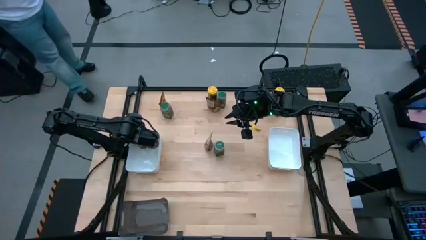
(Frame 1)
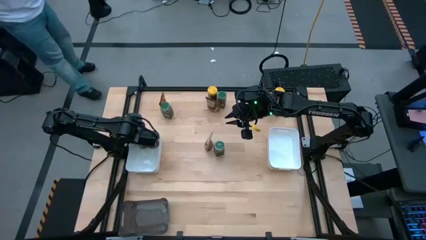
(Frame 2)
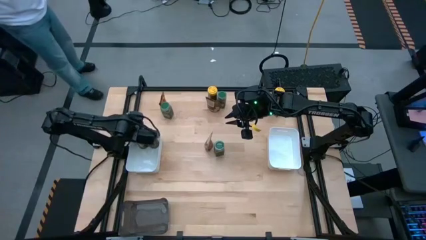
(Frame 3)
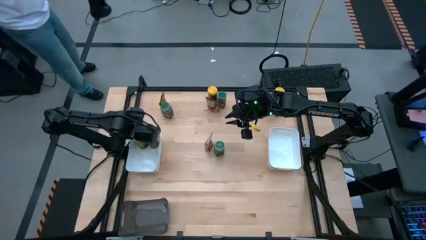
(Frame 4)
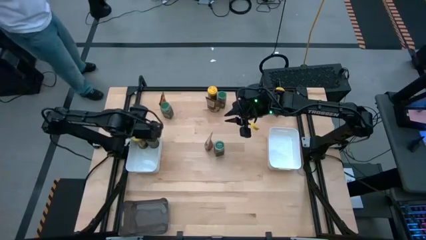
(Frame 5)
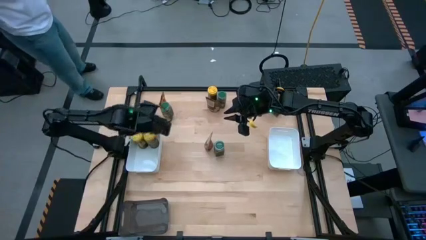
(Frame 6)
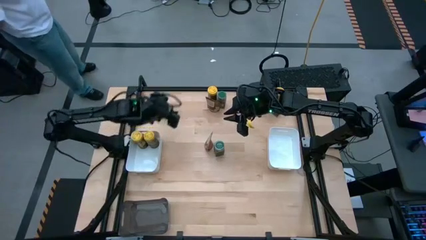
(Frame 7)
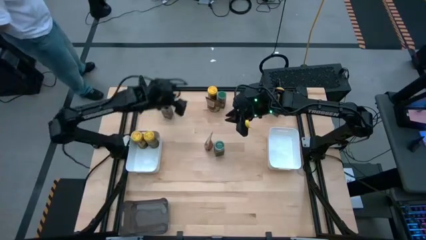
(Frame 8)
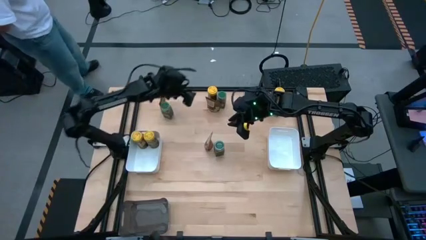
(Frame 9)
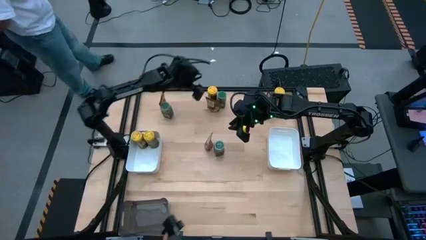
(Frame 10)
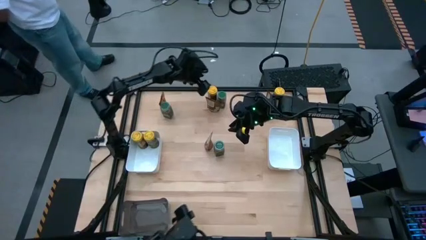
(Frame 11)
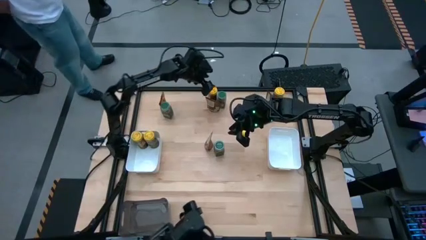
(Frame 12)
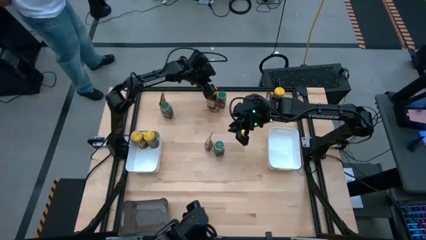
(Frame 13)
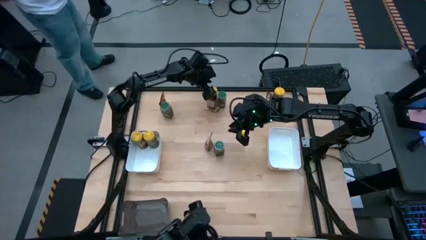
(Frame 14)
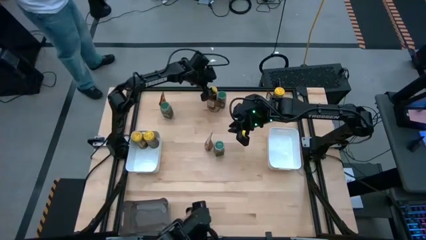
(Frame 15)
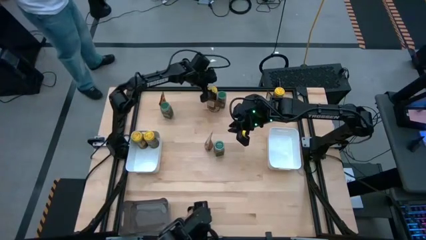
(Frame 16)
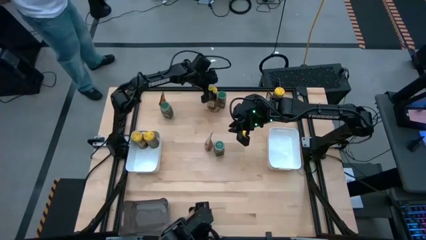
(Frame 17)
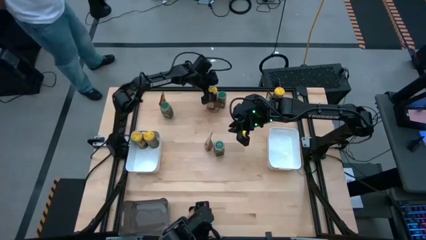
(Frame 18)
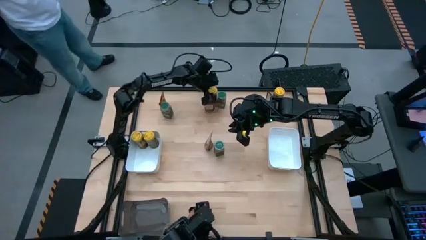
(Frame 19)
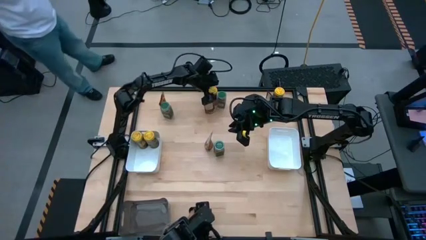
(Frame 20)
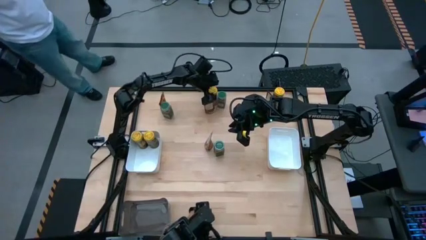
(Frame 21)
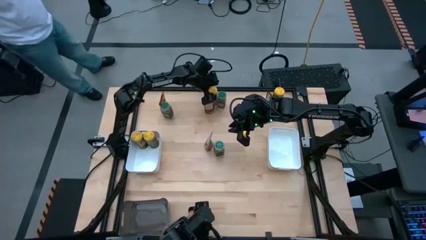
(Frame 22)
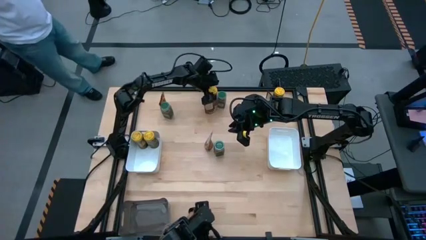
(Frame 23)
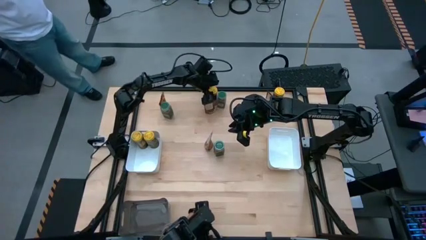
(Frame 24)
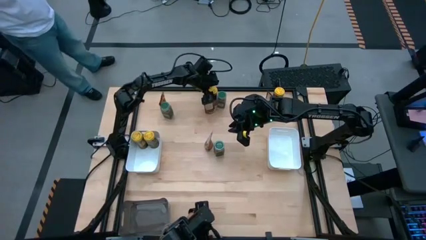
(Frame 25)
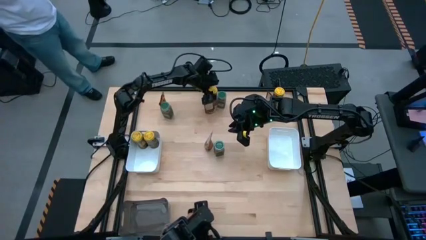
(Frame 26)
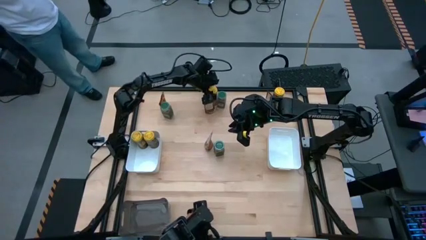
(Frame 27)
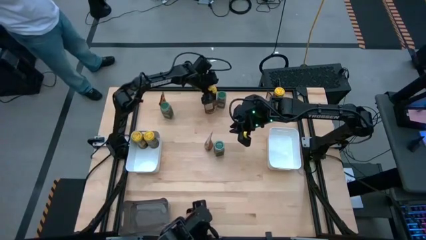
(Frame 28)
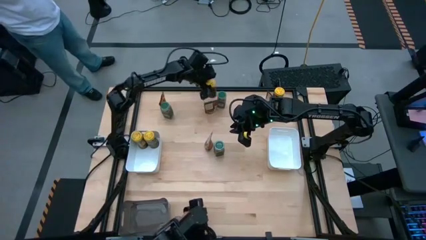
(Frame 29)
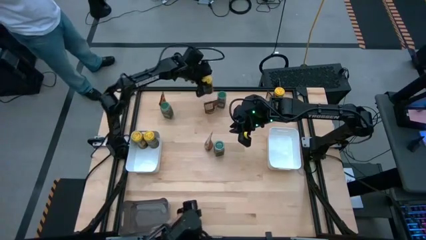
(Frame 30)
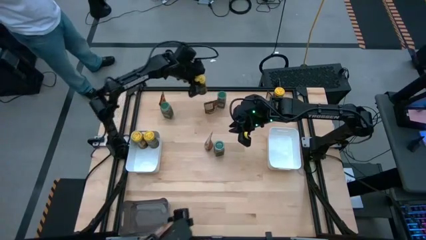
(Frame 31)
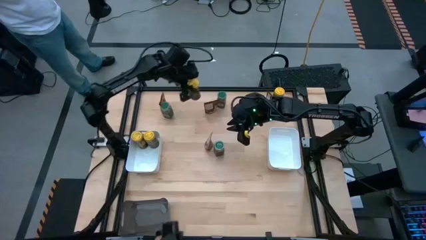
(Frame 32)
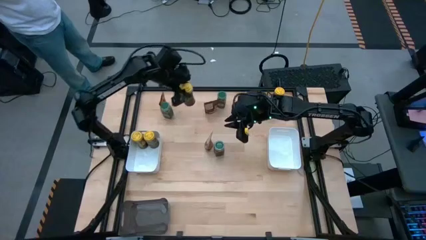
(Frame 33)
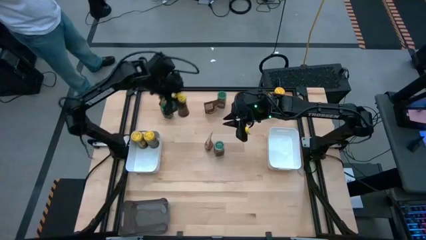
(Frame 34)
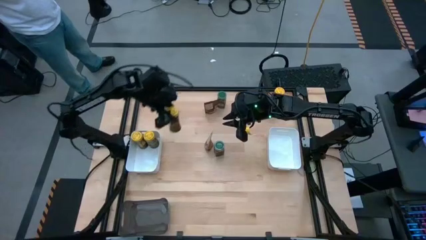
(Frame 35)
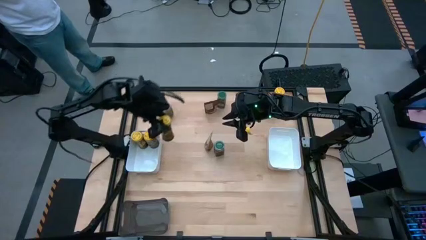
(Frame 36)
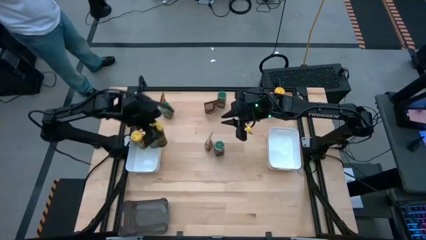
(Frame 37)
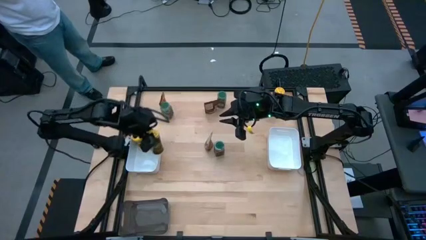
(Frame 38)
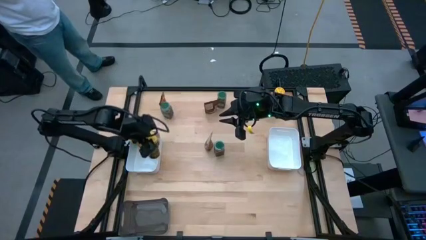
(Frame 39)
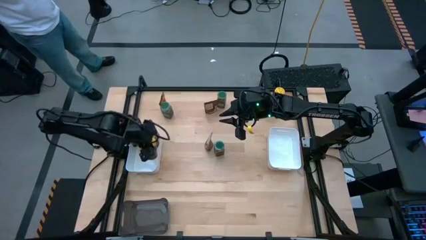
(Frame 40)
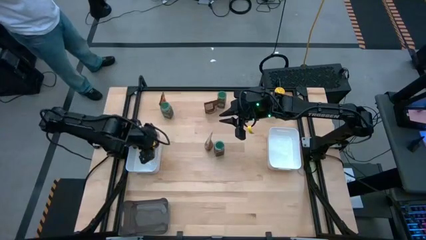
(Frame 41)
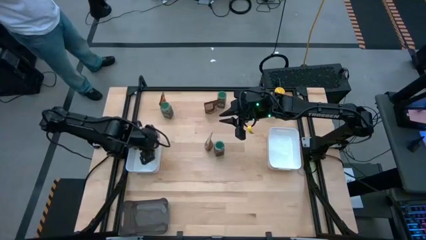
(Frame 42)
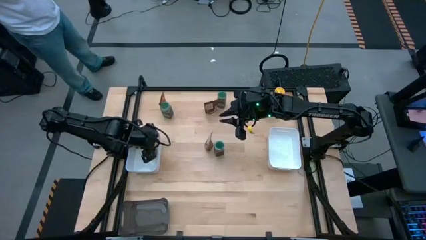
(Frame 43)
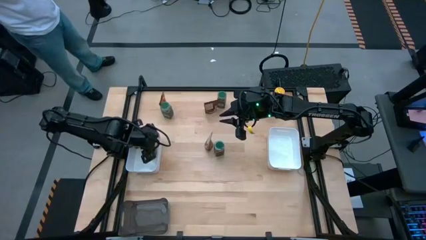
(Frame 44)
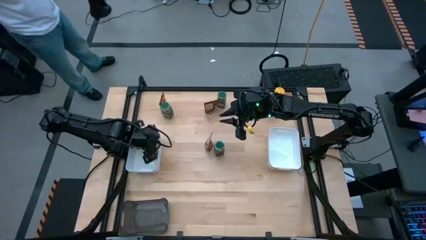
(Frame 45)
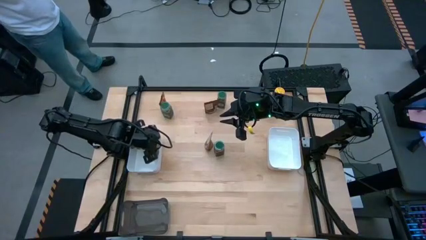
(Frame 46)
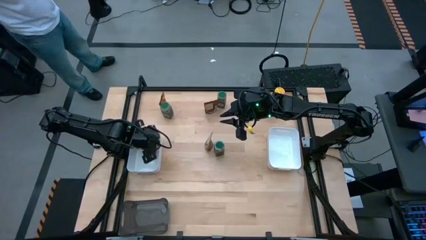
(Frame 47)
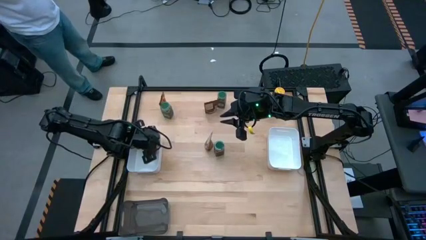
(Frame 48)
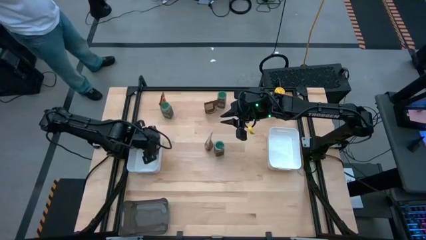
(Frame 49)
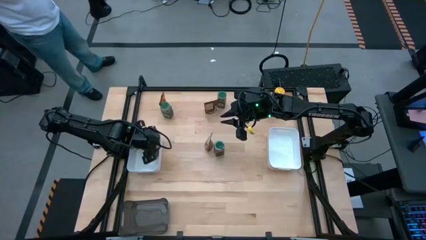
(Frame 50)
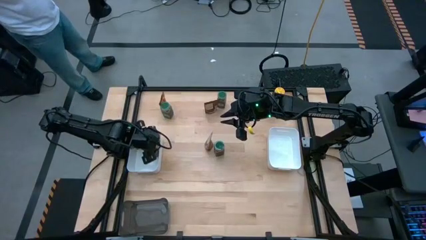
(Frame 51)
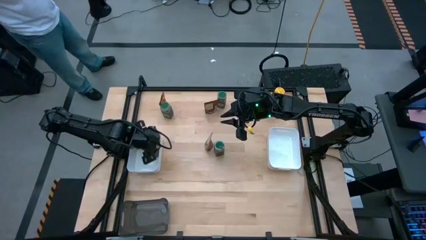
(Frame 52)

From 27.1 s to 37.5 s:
Task: Sort spices by type
Put the left yellow seasoning bottle into the left white bin

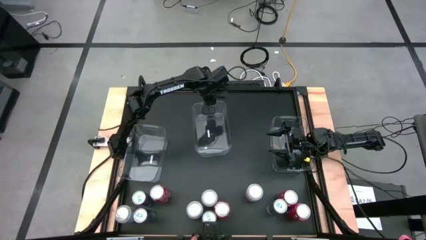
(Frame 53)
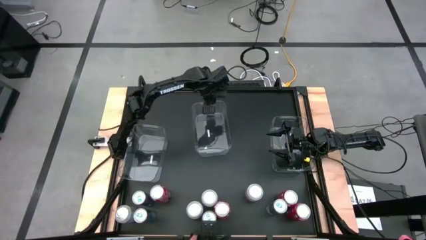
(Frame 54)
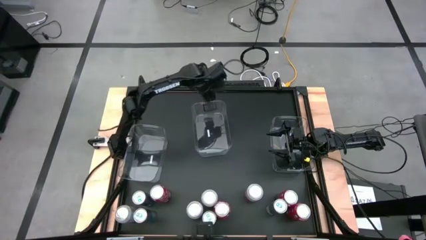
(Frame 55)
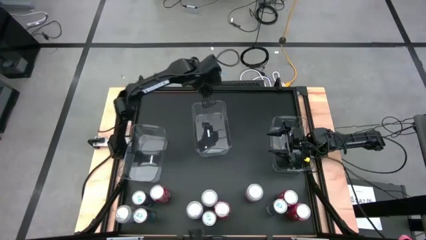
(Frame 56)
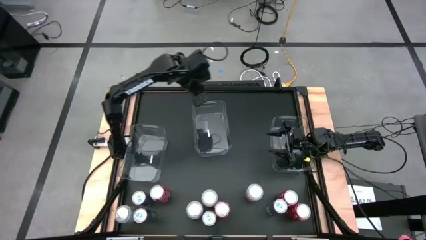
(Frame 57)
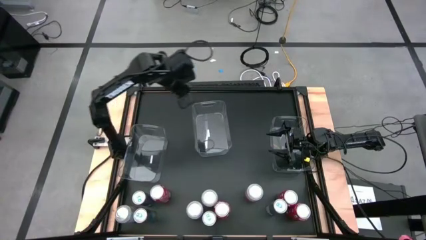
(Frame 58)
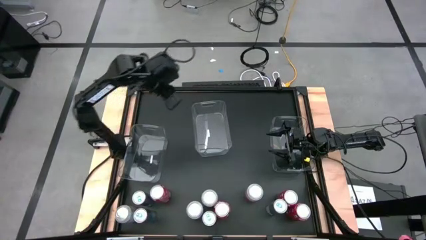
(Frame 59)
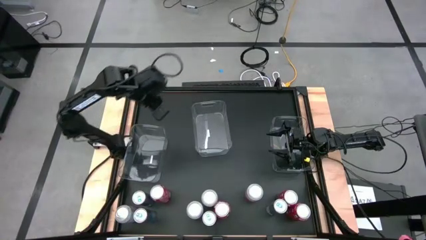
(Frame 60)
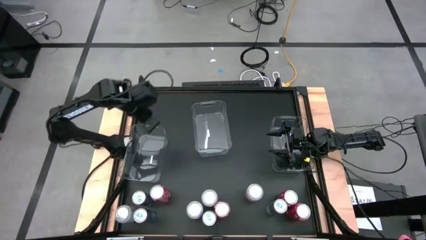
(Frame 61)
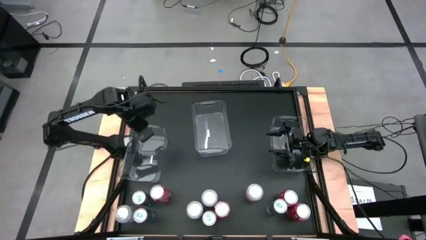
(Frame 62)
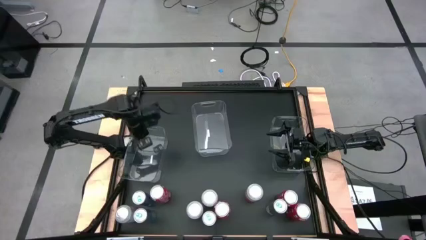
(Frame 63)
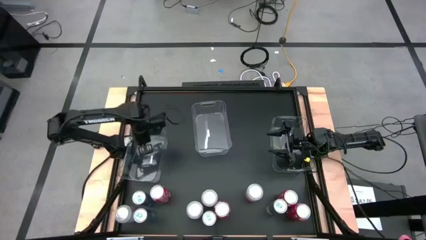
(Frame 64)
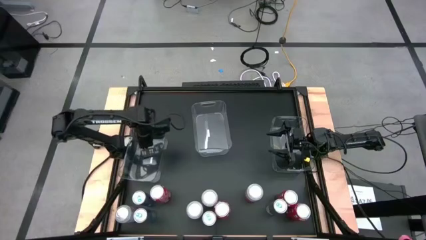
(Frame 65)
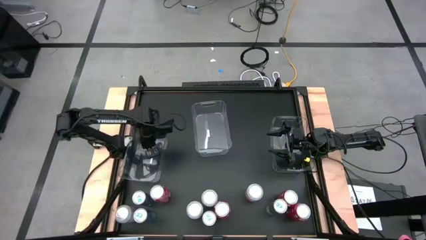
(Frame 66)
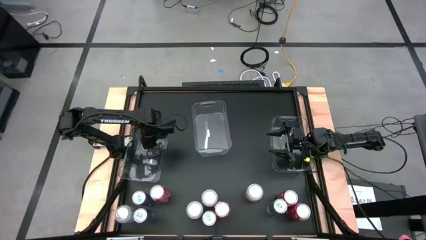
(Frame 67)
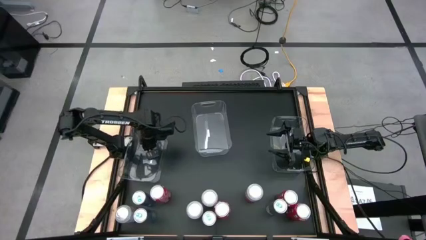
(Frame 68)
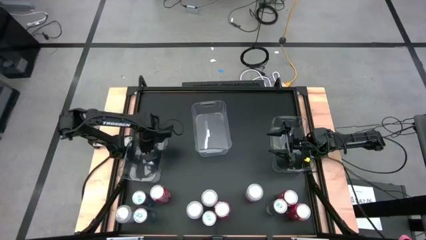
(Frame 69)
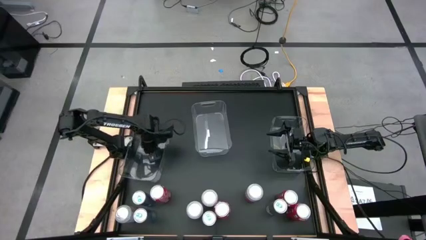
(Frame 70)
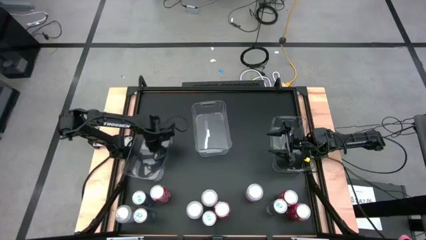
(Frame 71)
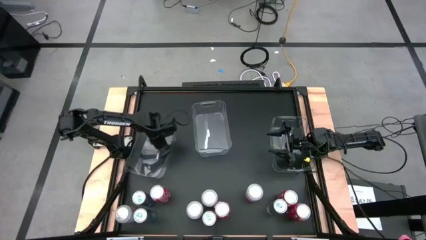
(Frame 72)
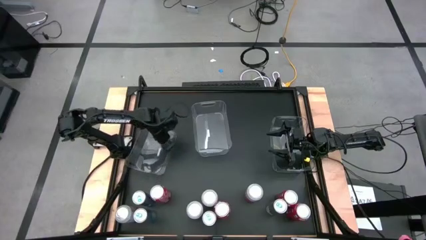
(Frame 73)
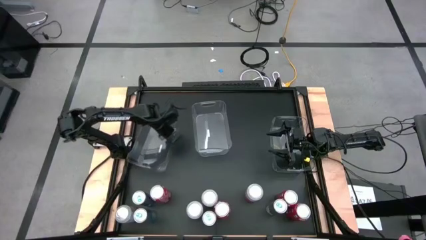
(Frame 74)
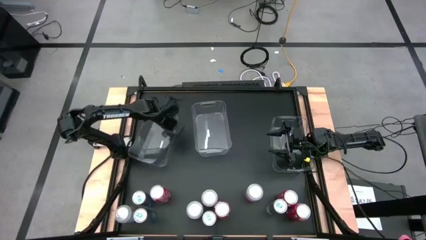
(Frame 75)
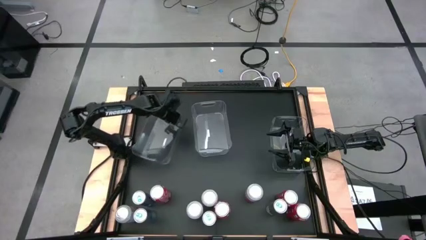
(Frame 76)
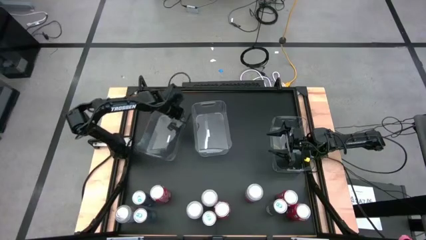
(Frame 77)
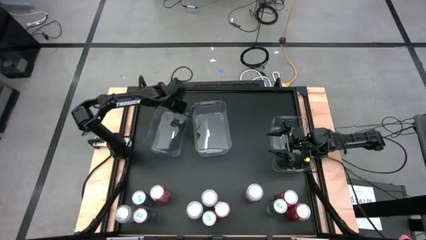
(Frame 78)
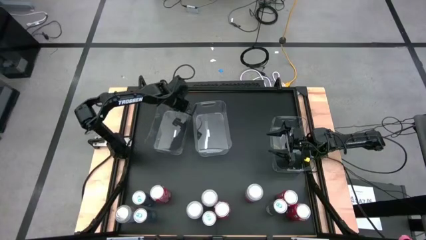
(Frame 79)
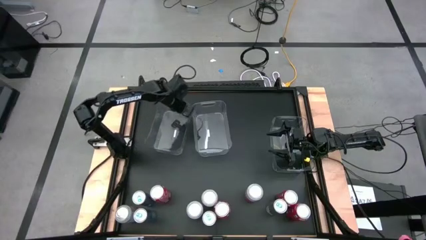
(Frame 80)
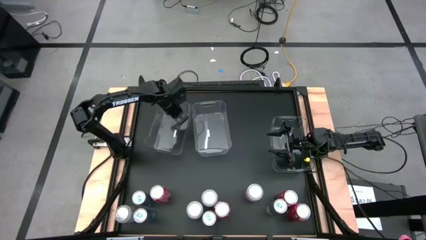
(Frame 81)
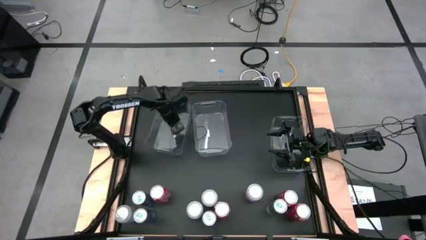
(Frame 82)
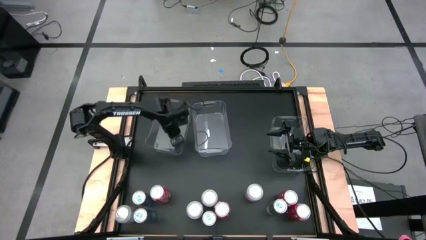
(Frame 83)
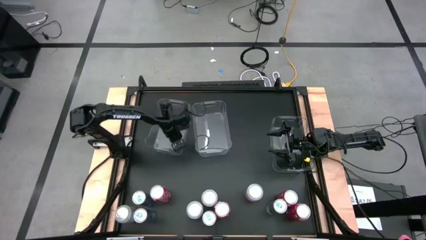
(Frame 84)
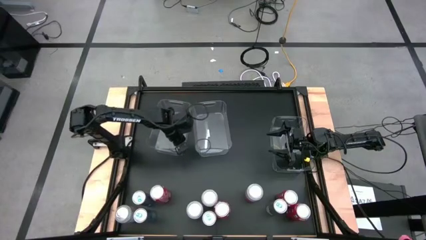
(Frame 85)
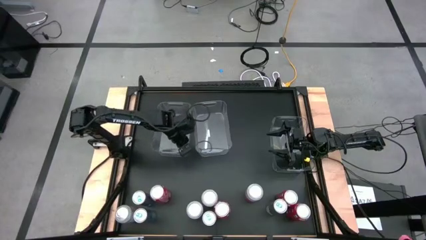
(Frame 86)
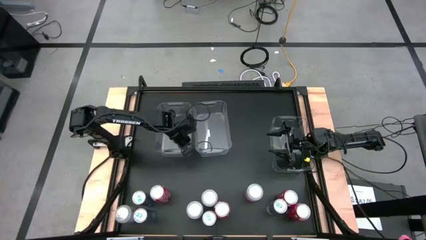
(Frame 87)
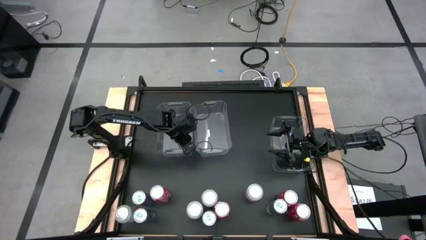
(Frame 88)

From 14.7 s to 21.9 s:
Task: Sort soda cans
Adjust the left transparent bin next to the center transparent bin
